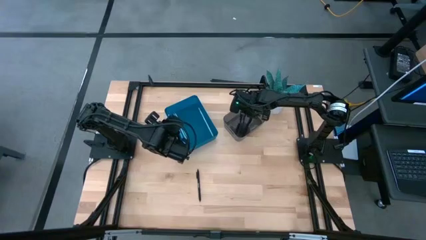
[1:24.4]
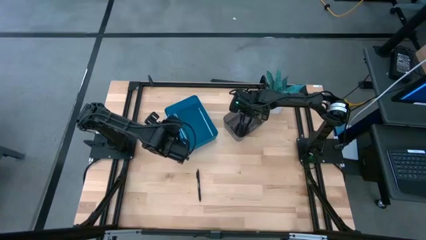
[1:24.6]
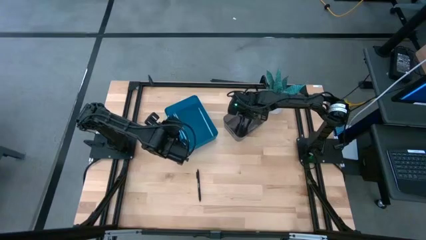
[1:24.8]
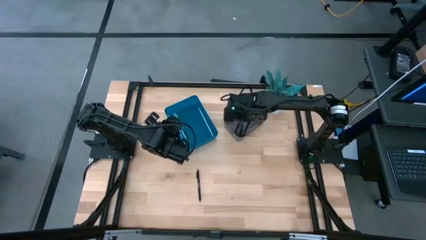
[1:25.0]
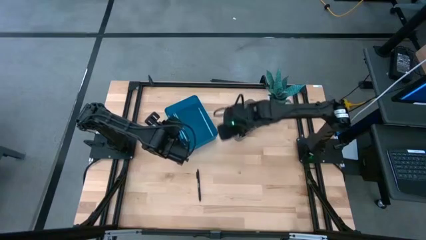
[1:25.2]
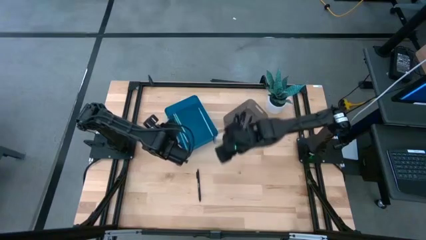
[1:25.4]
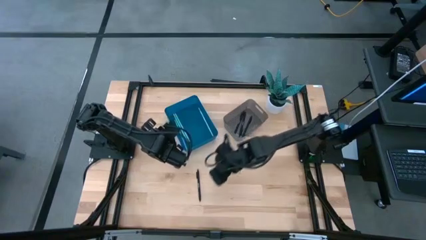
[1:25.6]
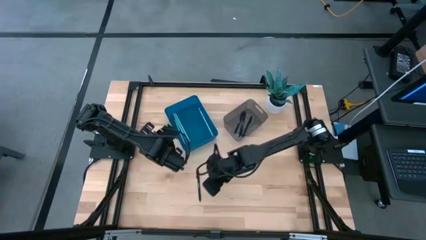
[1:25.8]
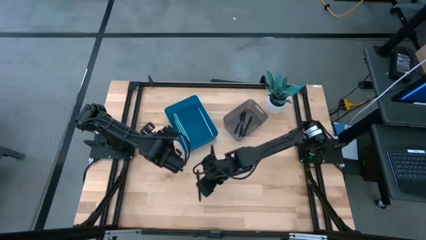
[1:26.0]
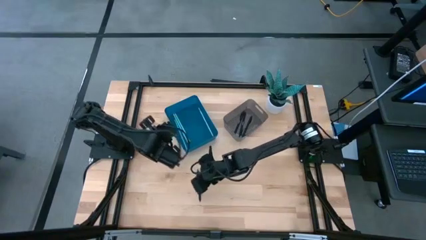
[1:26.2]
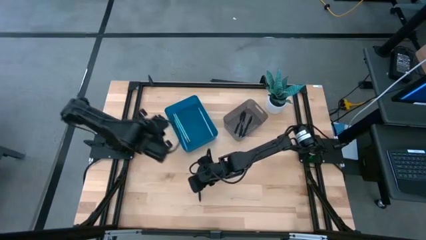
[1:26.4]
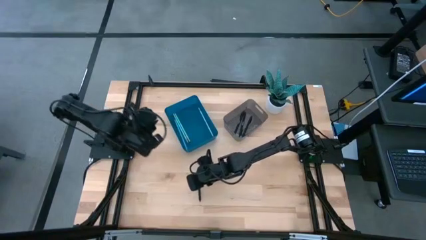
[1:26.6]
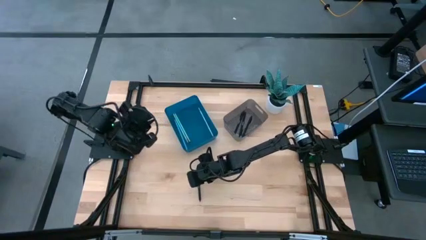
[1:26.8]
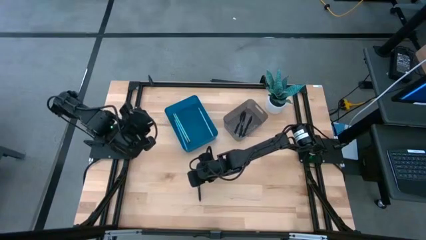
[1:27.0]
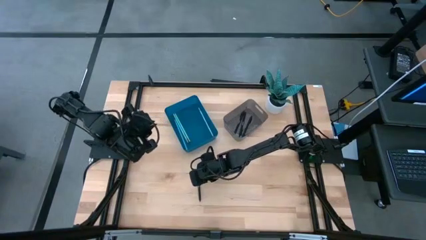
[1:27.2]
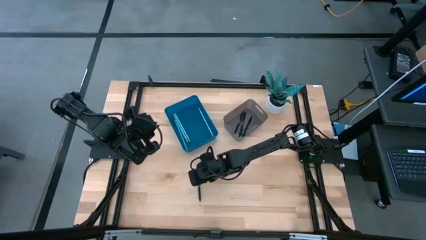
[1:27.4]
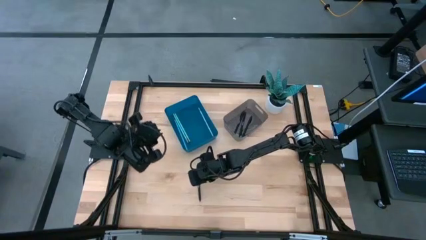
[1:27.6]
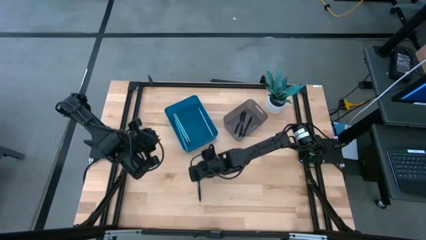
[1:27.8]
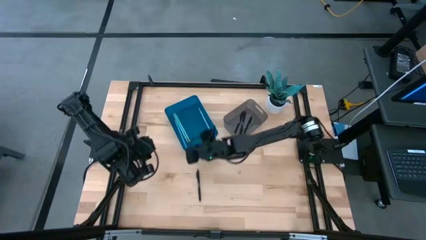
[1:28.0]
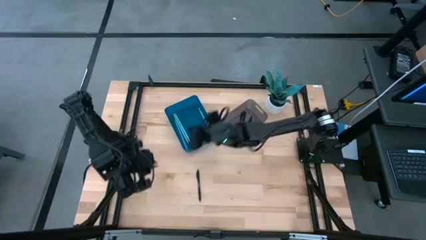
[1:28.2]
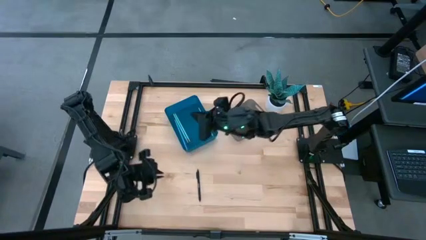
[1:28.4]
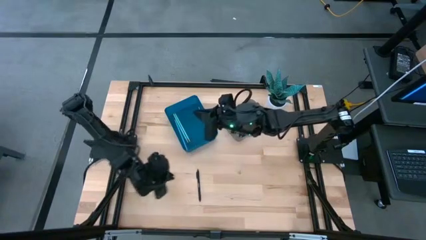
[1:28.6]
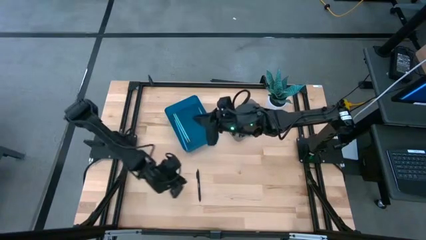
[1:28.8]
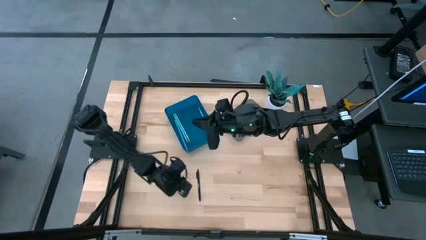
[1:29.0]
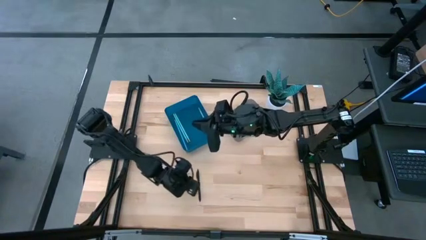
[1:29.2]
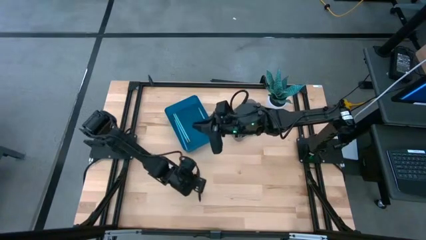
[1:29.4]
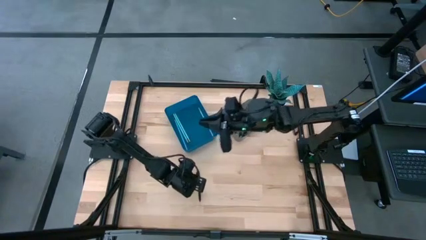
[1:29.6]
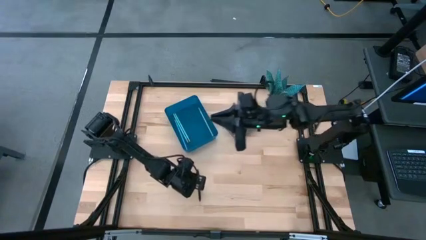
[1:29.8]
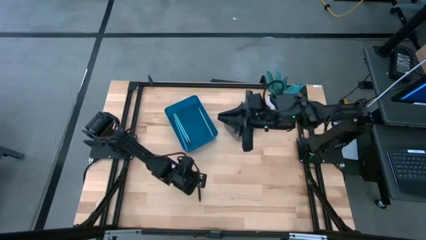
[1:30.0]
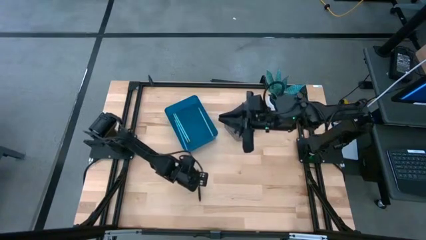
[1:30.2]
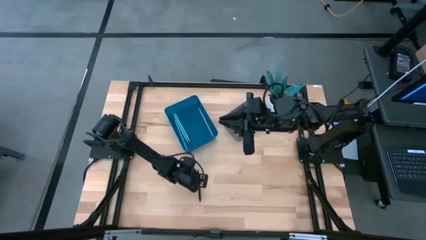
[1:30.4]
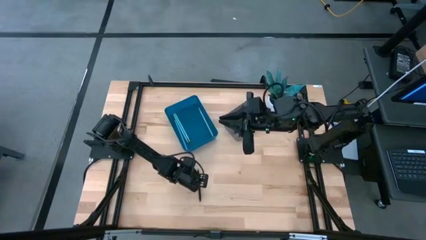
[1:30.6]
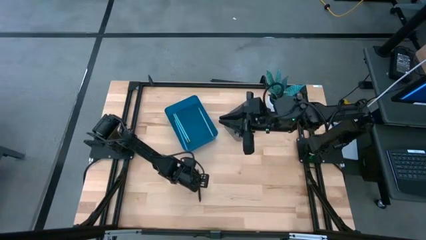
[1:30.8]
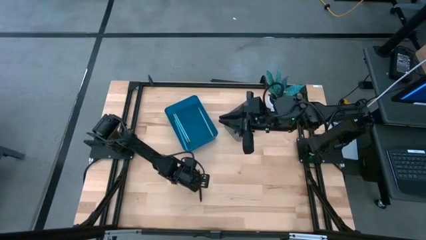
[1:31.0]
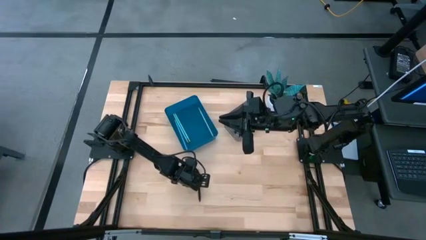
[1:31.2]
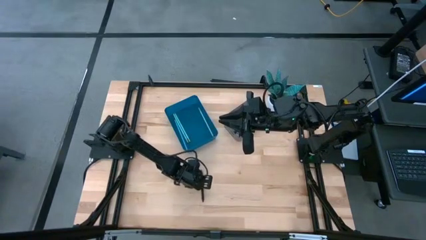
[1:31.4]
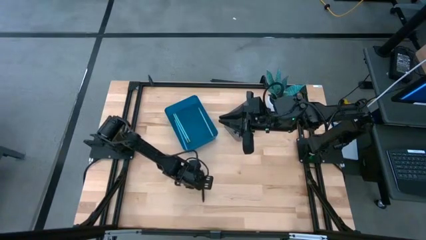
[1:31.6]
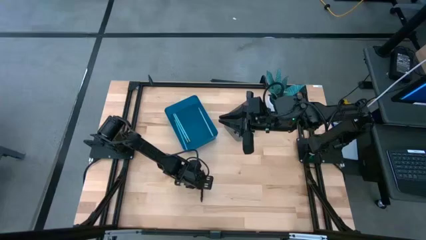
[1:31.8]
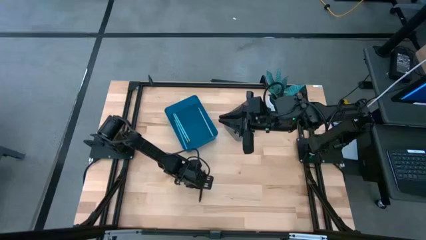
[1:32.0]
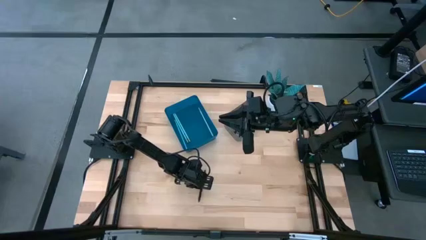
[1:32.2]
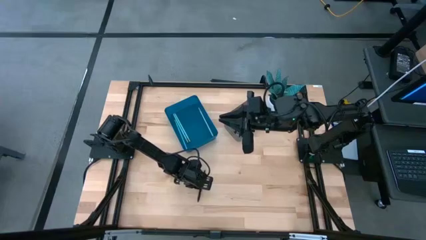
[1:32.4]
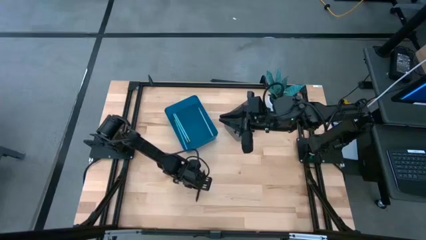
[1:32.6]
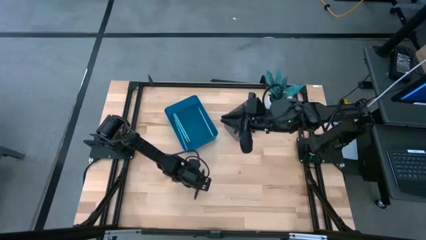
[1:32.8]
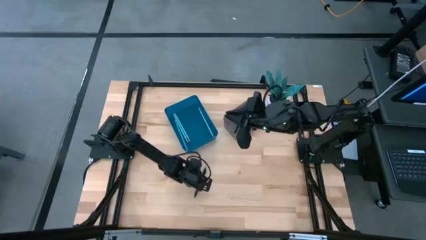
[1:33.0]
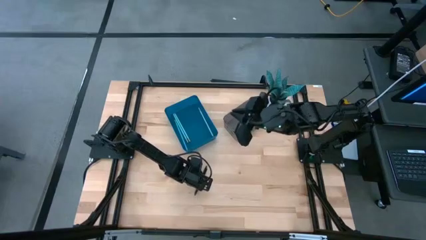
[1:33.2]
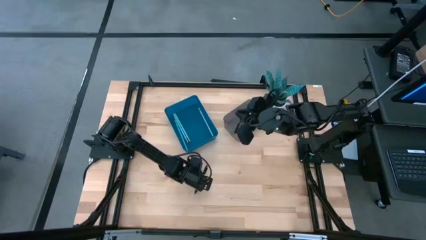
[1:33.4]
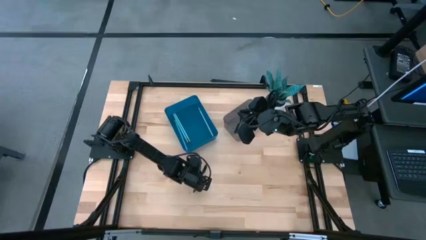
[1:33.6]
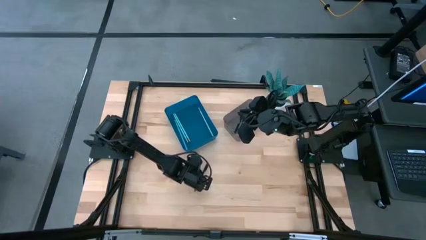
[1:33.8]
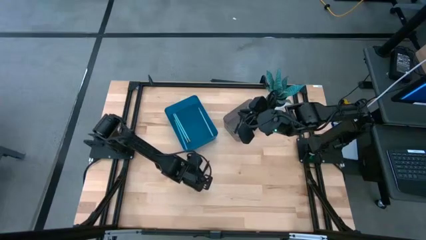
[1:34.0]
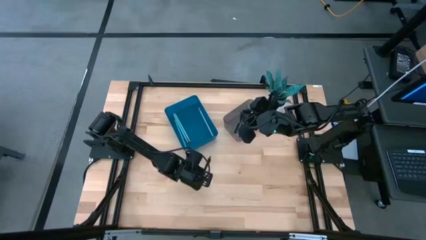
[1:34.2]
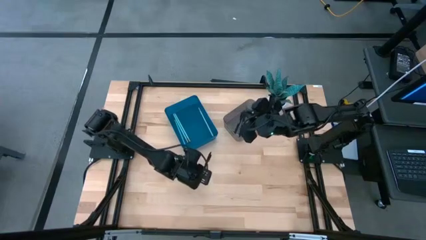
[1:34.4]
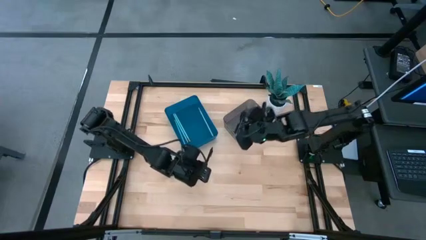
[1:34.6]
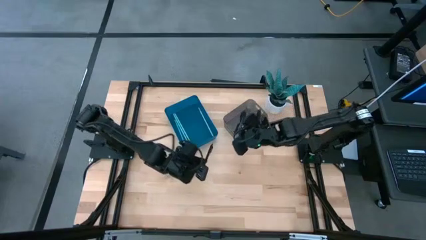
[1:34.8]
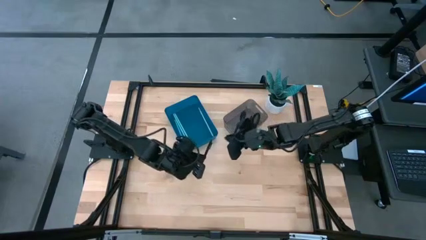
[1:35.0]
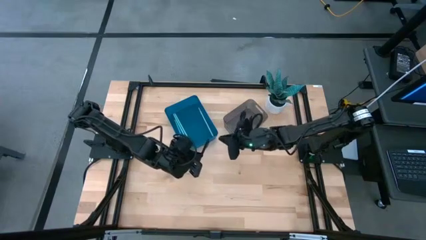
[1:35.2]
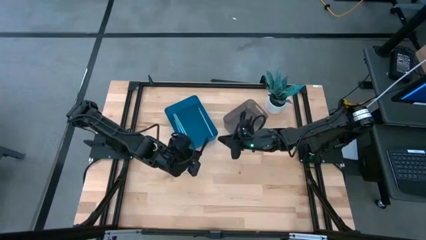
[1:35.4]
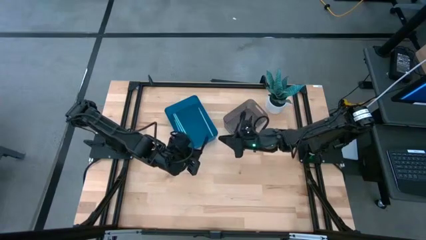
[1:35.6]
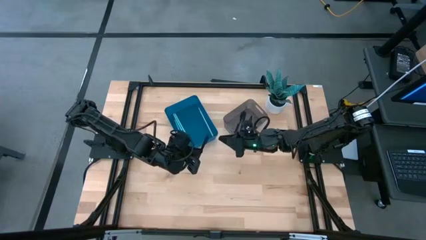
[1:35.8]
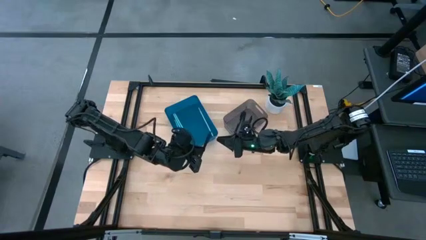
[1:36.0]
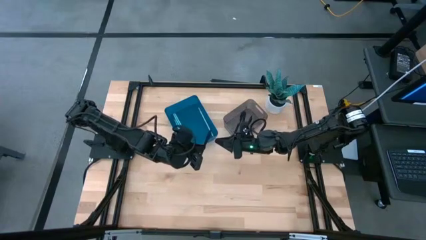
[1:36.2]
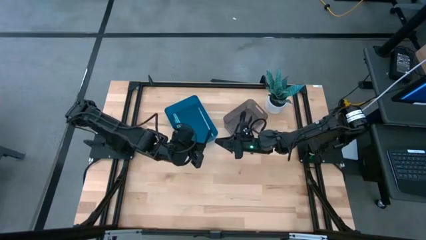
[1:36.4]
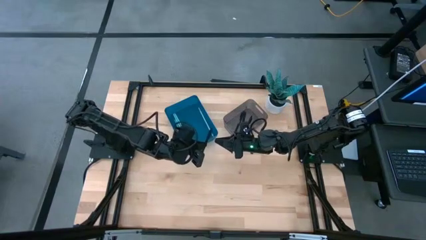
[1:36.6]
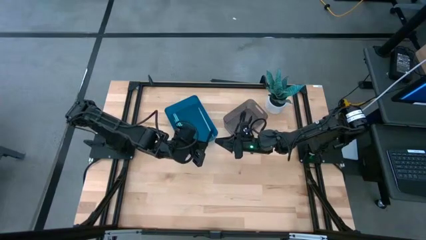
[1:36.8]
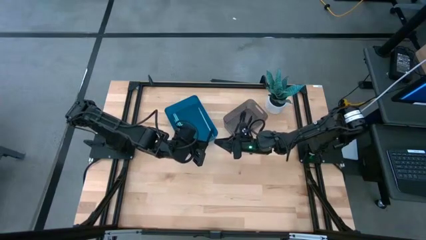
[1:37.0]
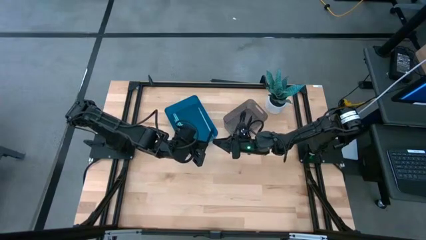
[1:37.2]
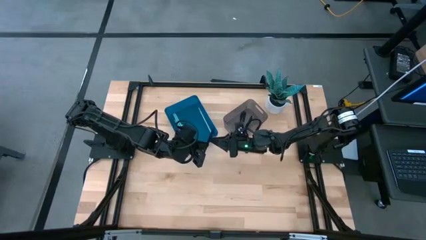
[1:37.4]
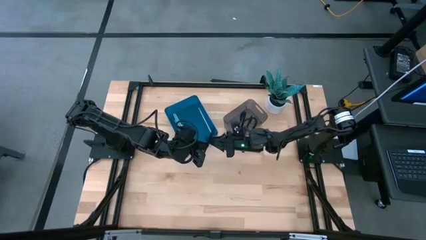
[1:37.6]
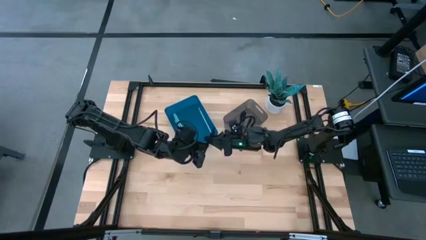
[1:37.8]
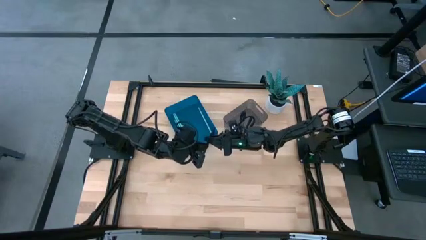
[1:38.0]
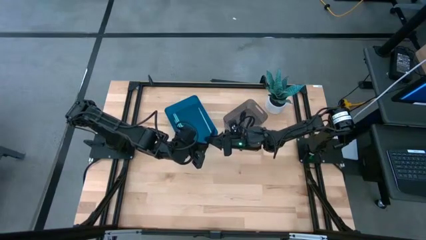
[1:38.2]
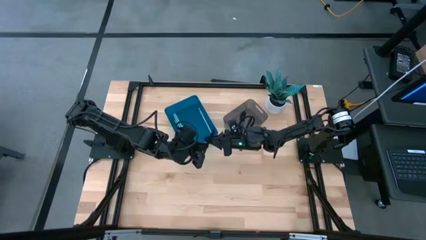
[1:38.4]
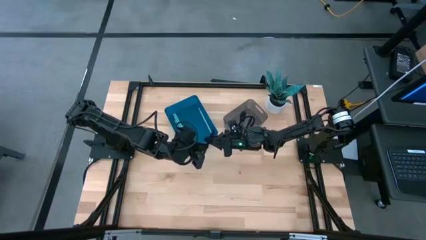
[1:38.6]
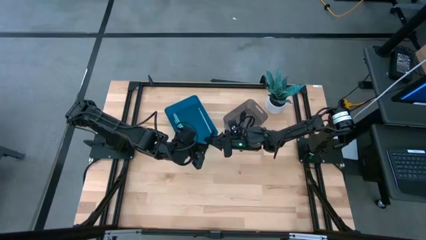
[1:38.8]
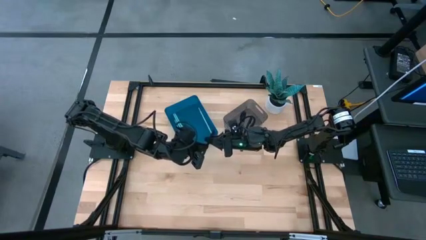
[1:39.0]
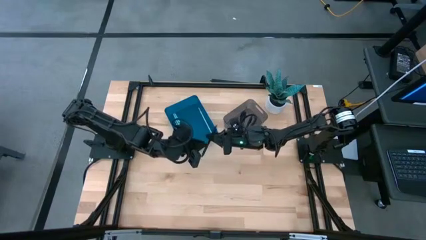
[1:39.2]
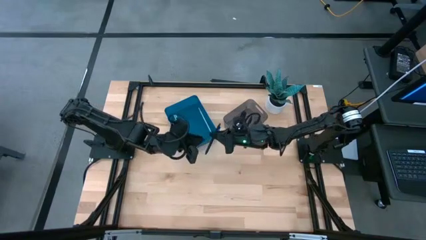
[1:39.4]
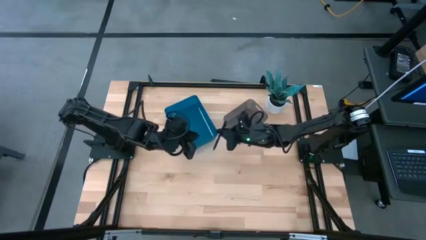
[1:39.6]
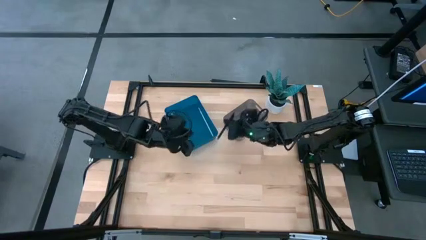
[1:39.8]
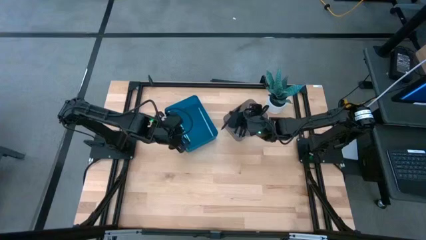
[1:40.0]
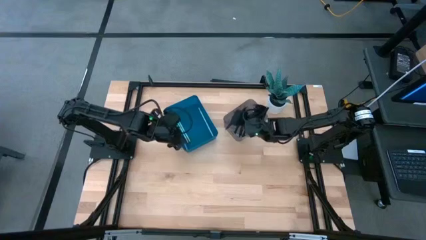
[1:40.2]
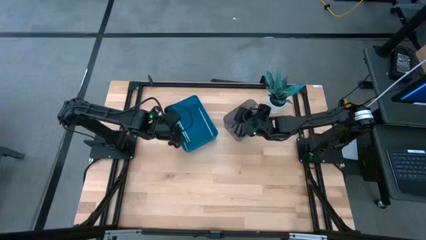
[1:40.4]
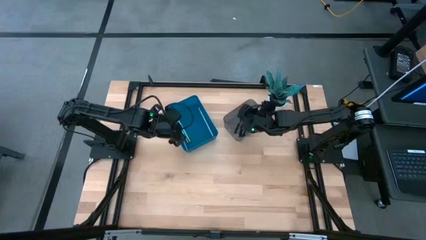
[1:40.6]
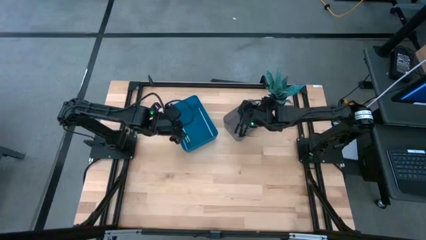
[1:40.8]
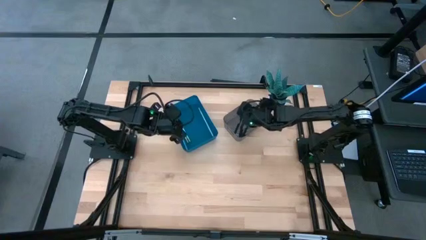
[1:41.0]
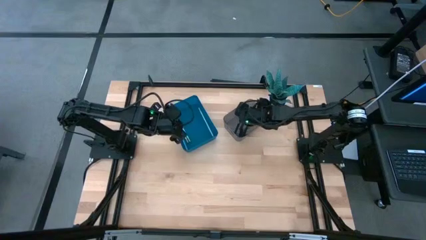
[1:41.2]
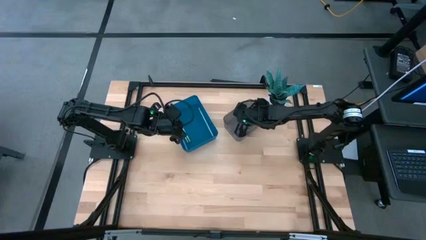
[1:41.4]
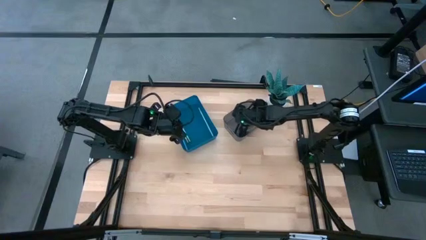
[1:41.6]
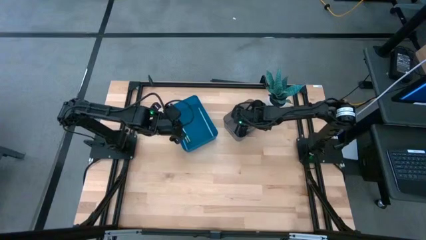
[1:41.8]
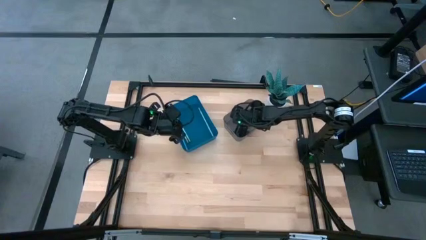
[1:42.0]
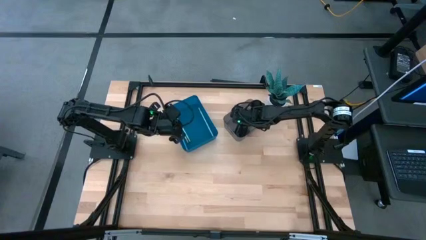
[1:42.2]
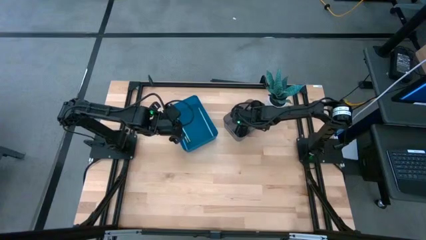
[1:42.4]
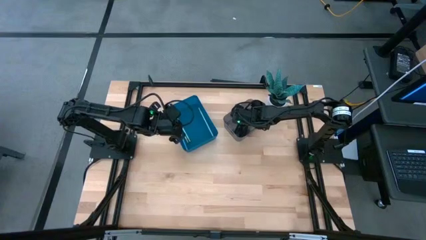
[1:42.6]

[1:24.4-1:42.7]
Task: Sort pens & pencils
Put the black pen into the gray bin
